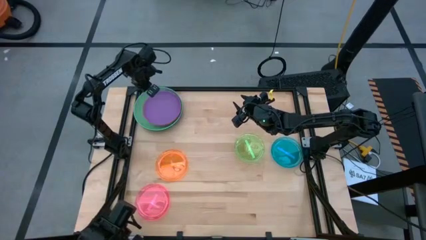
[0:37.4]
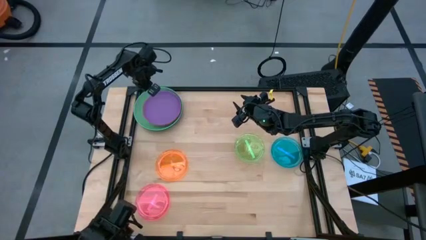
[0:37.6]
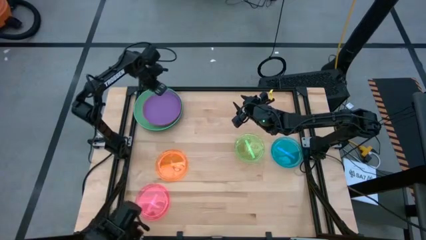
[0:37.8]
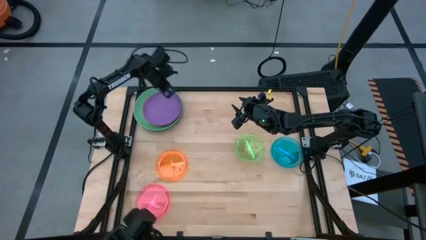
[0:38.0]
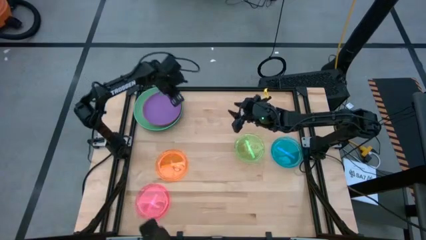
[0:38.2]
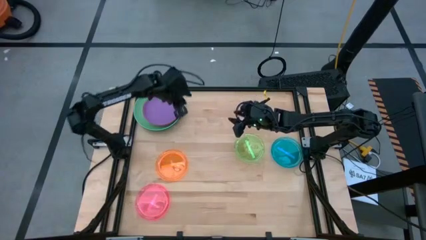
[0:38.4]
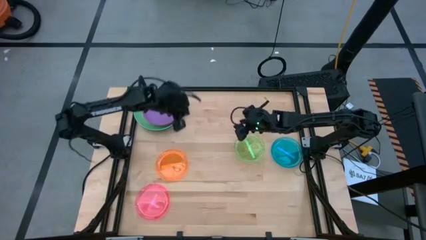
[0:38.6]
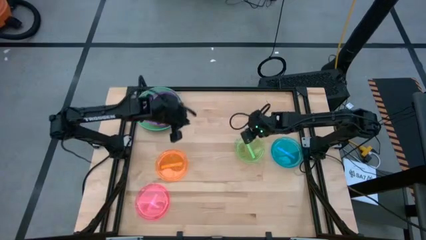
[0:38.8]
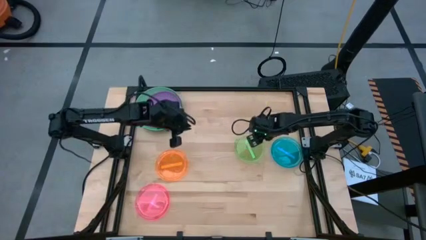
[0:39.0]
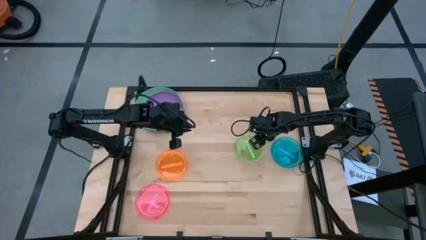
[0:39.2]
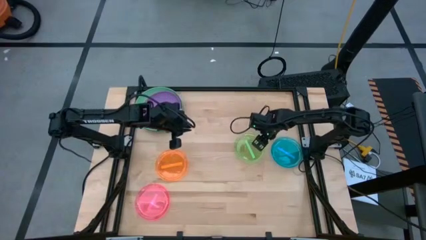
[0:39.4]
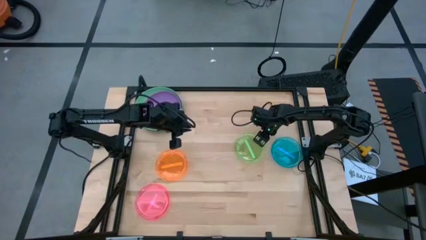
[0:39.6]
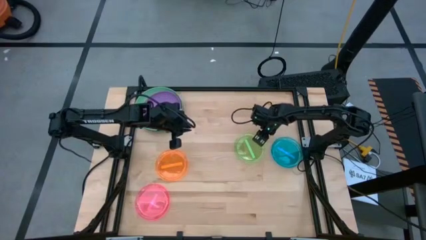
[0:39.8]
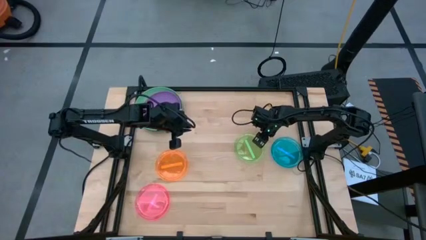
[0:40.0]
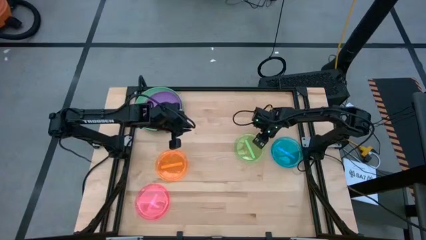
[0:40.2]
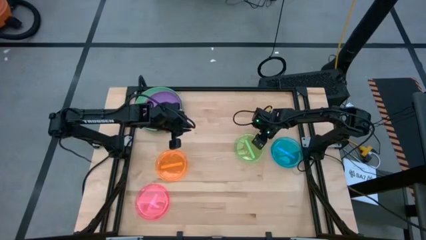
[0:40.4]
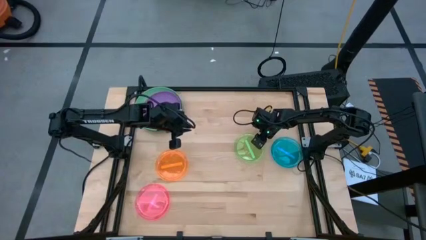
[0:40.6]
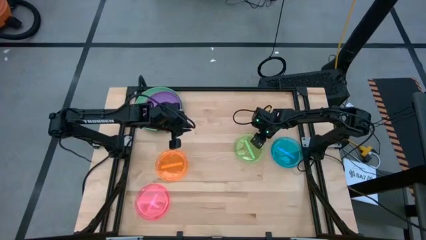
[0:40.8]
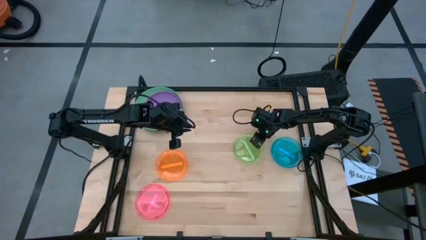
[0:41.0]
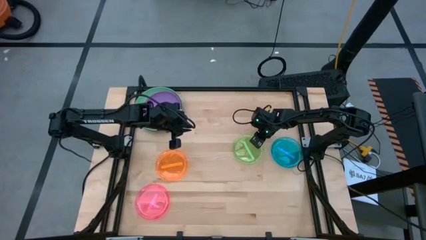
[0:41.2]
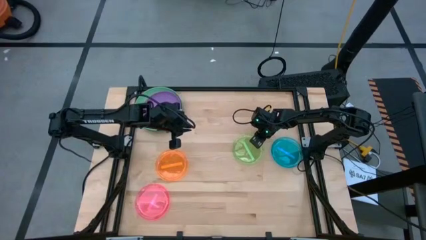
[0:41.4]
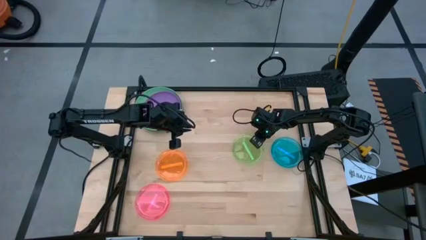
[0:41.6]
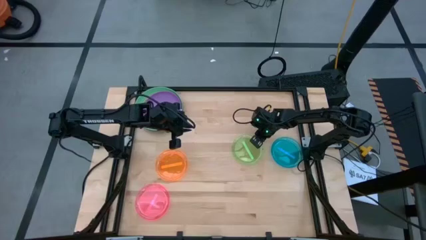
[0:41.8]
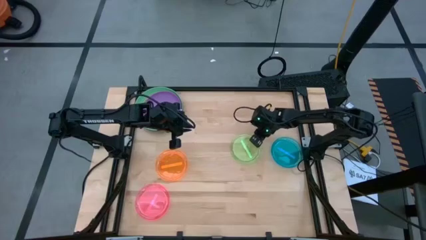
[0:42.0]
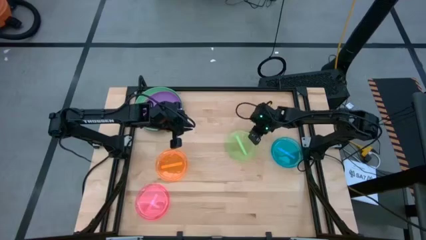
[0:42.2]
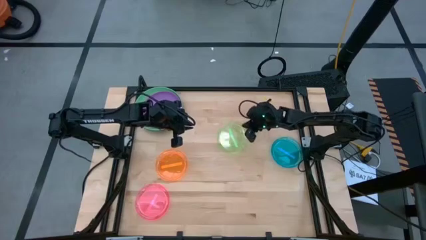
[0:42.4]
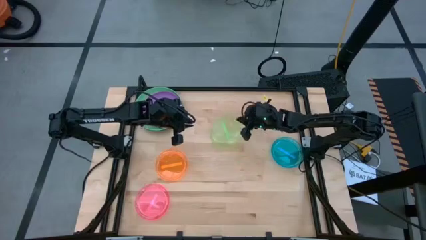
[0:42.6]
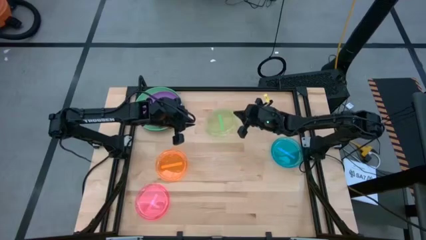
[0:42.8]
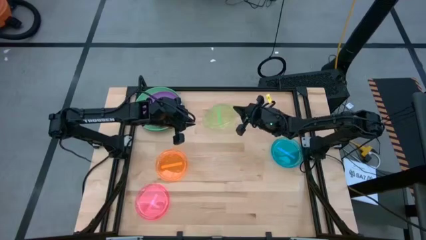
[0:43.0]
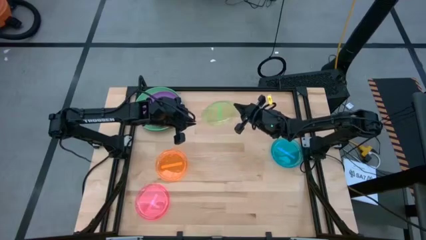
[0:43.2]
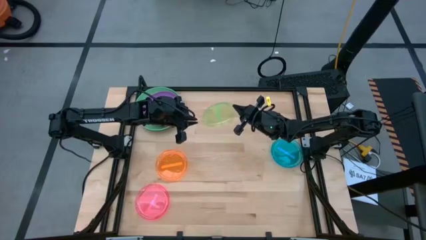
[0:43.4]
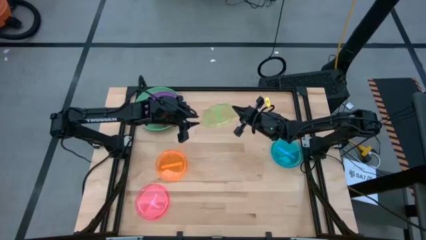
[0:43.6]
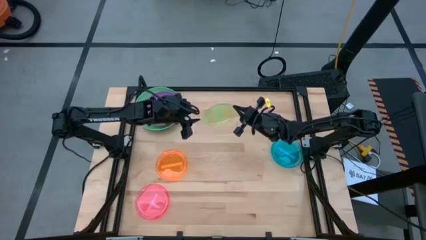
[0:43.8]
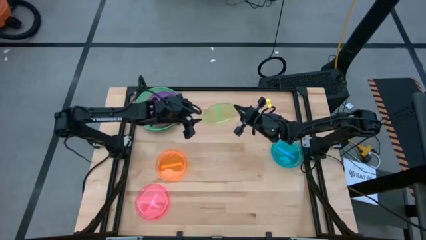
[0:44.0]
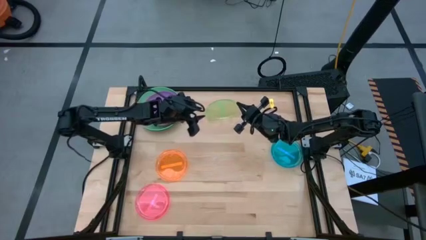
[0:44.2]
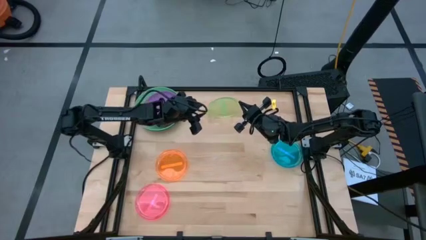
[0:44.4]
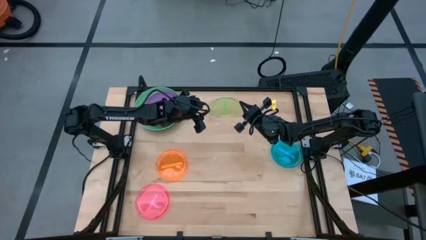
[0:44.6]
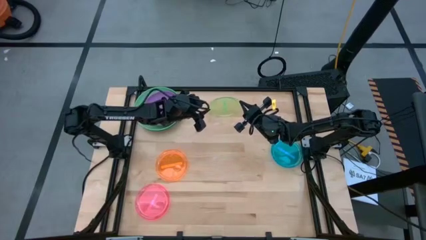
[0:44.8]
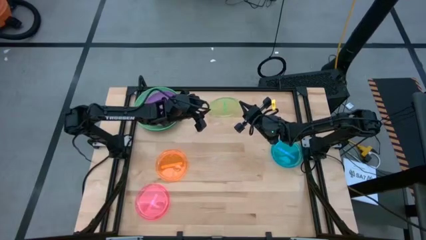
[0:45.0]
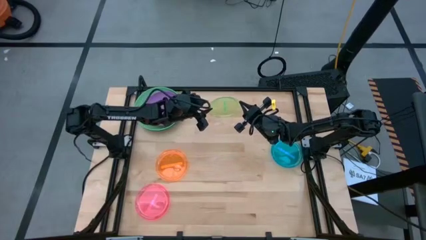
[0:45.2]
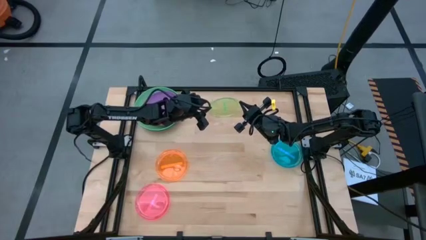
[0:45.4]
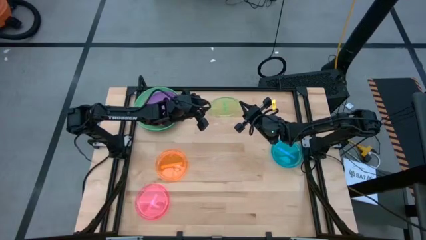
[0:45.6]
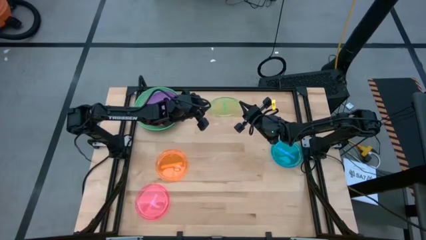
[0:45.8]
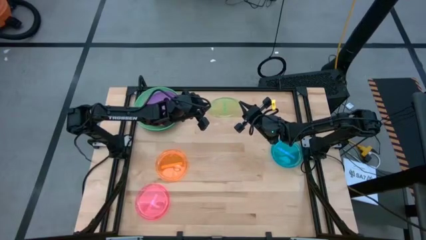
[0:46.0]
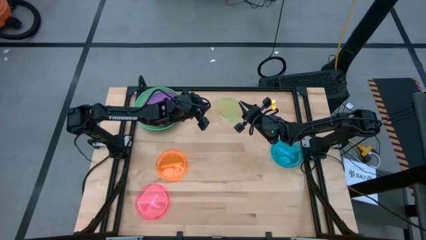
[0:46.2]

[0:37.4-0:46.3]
Task: Stack plastic plates
Stack the transparent green plate on top of the violet plate

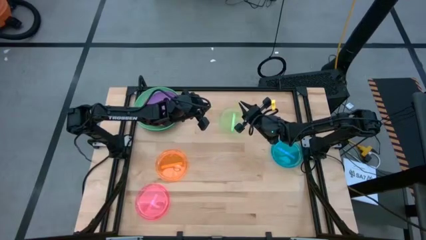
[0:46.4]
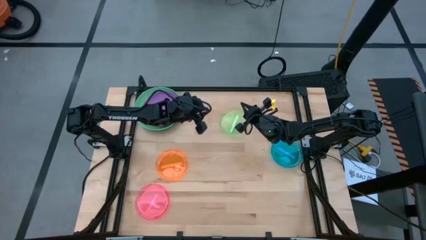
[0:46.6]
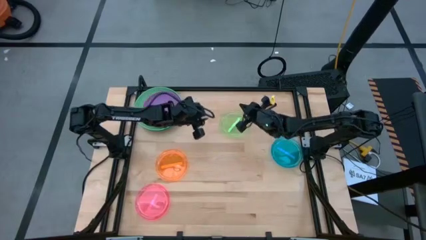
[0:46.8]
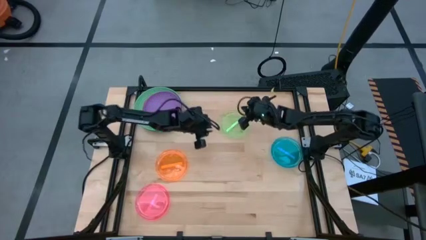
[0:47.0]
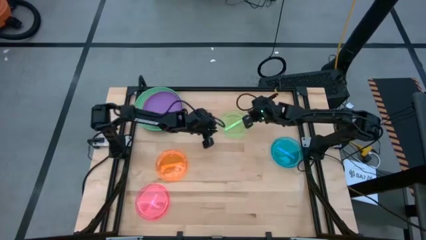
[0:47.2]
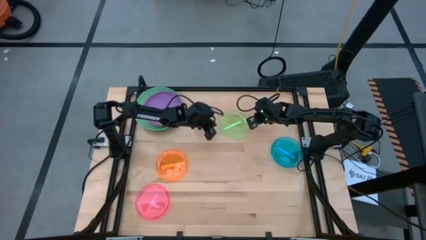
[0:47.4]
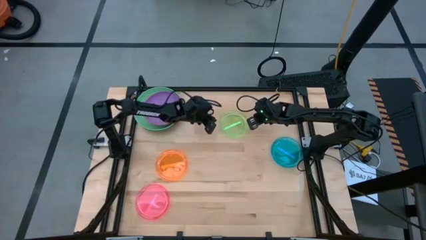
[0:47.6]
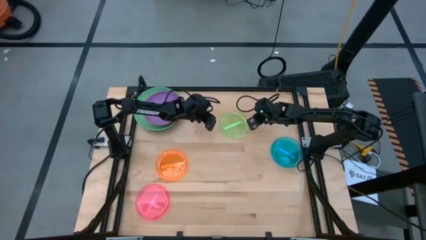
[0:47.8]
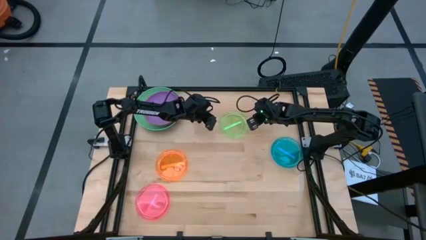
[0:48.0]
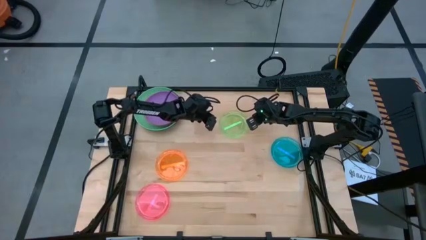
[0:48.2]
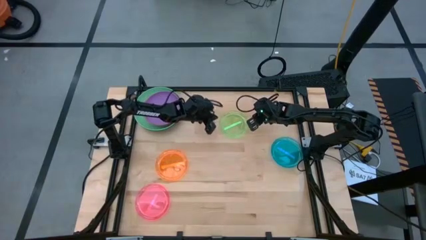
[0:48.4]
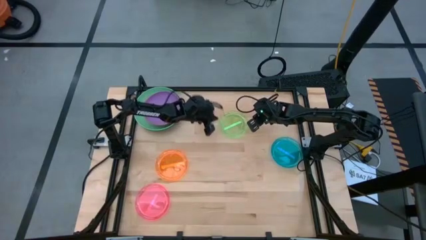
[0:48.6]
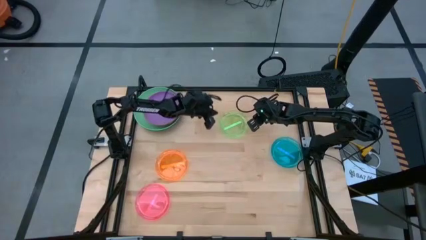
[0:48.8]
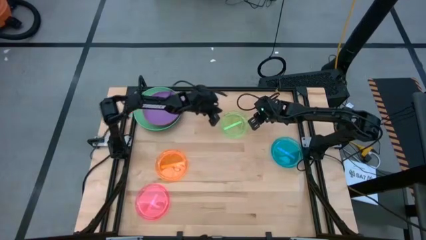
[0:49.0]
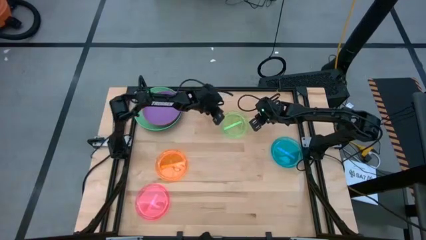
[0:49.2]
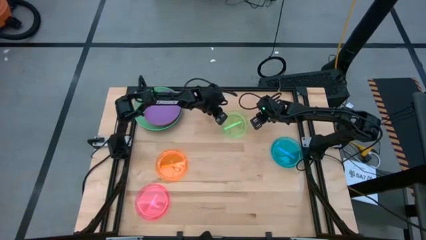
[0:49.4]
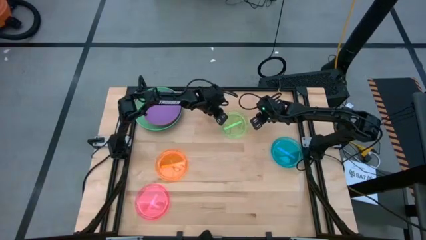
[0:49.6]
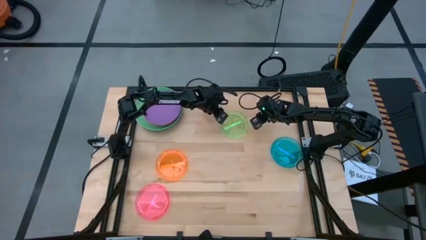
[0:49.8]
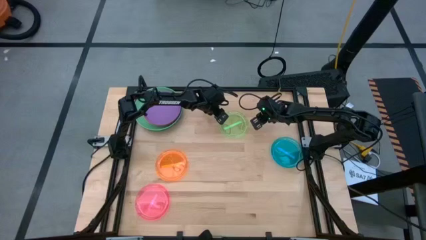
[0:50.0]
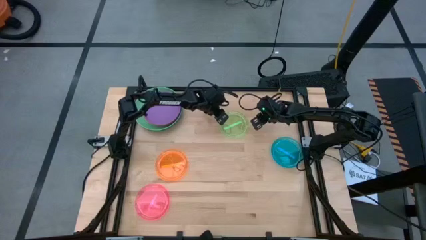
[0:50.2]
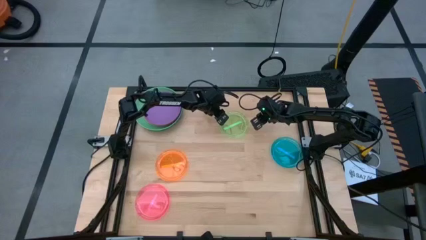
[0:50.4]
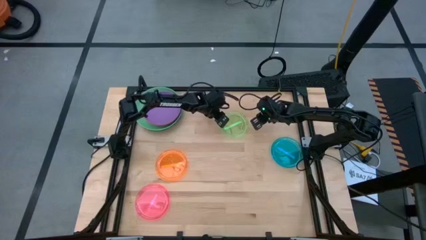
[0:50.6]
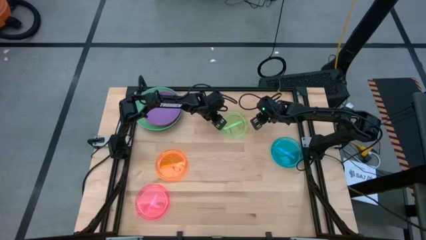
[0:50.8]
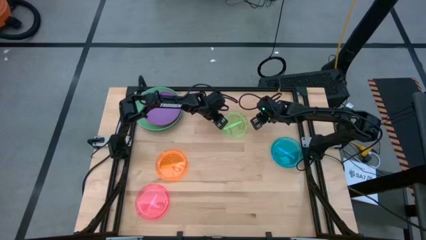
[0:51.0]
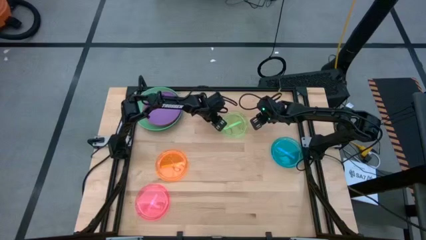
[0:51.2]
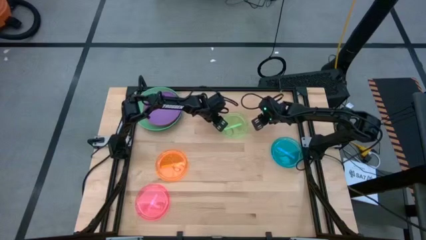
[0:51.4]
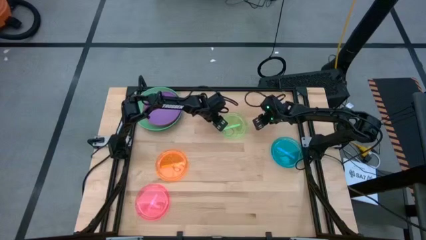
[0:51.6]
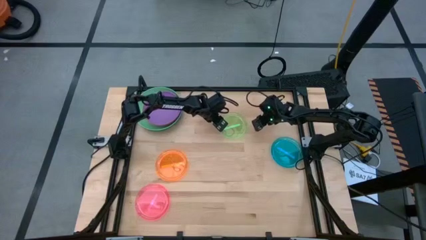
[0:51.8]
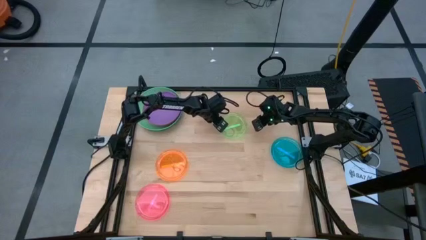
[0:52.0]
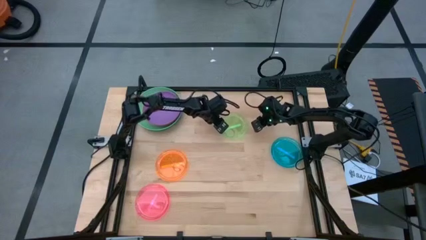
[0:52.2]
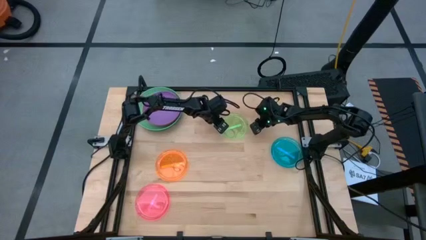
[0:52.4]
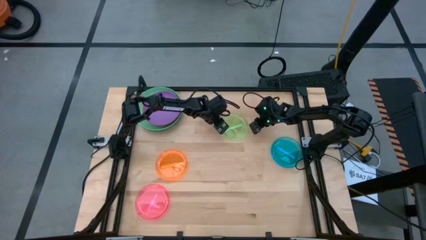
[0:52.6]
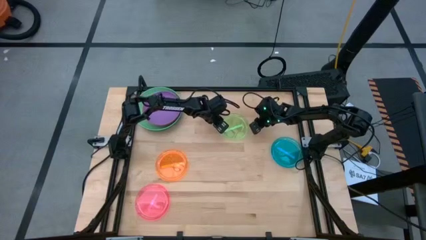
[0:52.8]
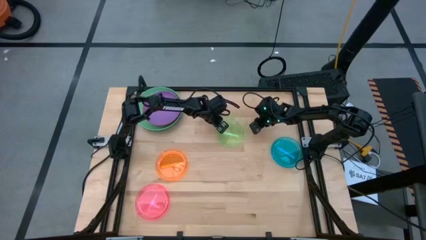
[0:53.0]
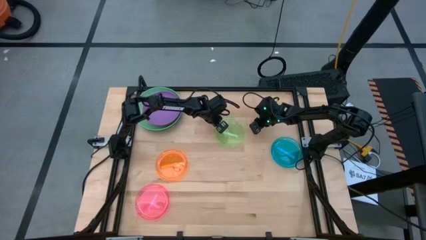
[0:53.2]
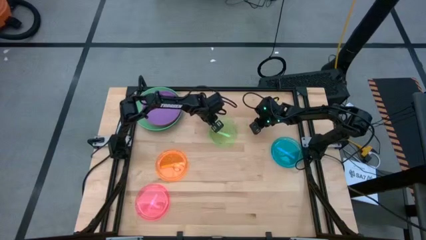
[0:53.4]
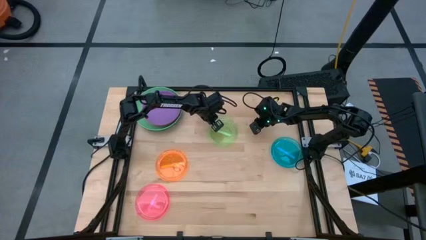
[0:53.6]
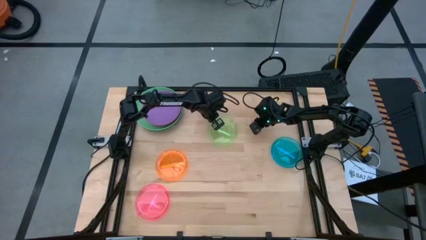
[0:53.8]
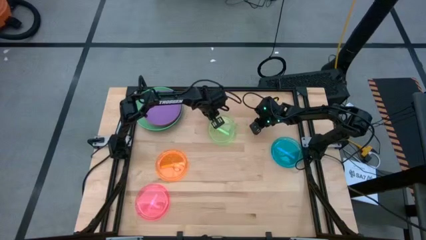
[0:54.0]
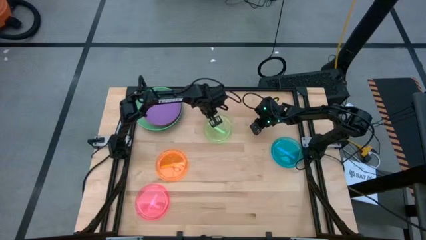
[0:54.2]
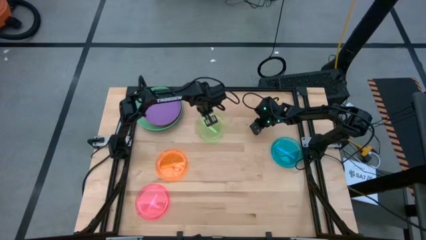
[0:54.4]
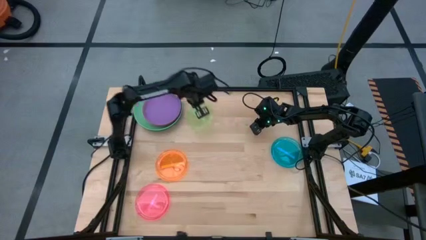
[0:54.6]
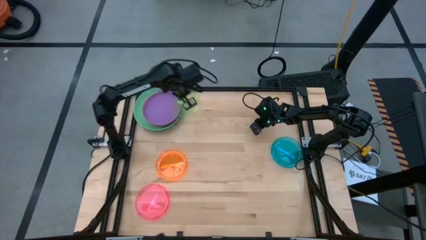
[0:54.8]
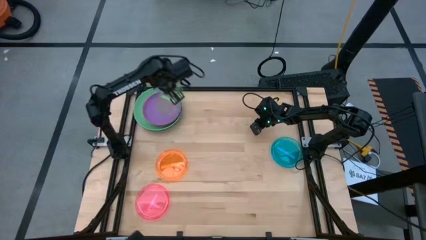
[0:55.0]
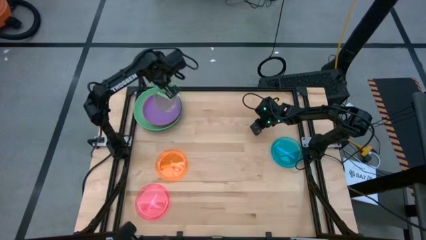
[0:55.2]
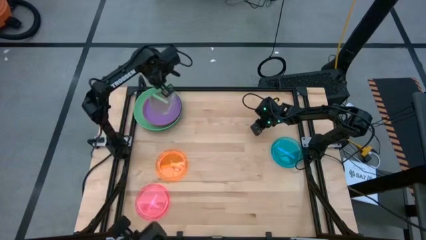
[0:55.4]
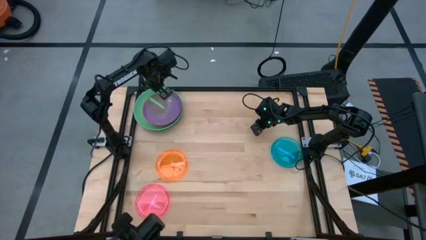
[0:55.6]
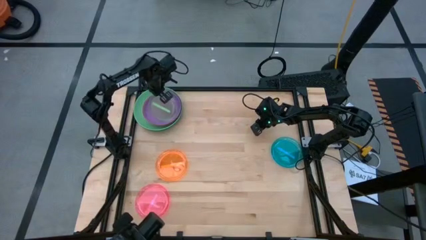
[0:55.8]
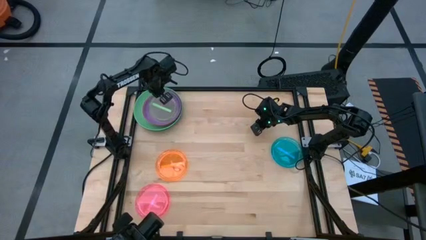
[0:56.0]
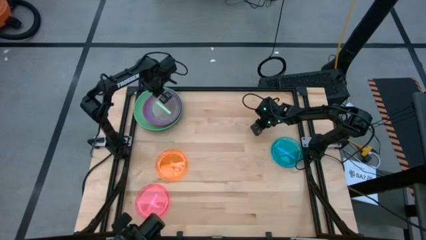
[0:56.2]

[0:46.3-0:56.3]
Stack the transparent green plate on top of the violet plate
